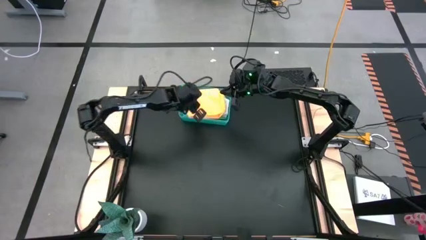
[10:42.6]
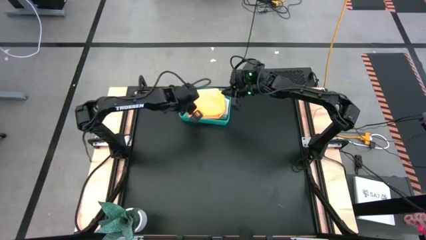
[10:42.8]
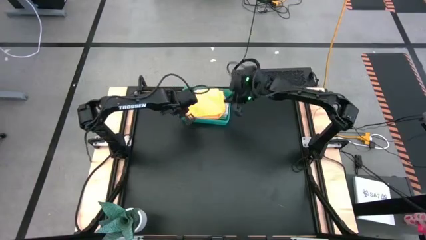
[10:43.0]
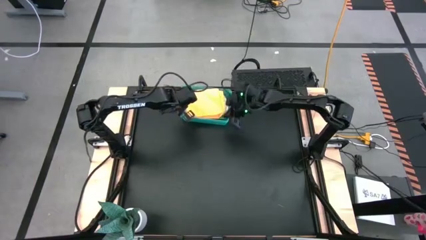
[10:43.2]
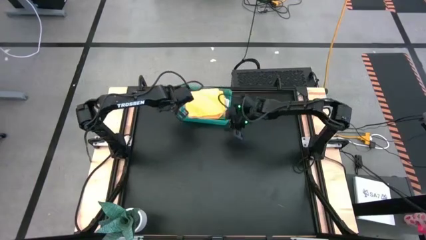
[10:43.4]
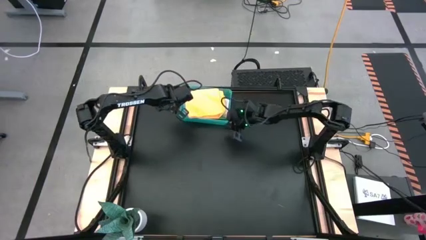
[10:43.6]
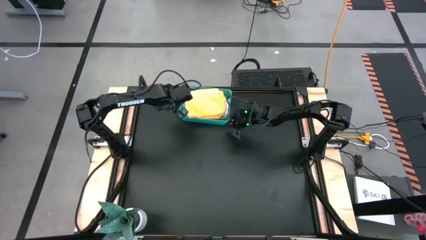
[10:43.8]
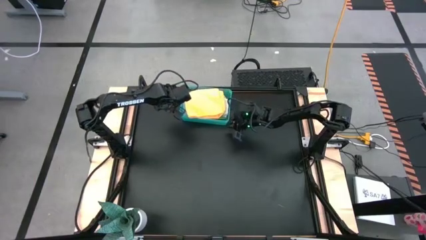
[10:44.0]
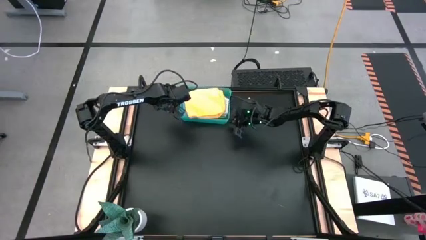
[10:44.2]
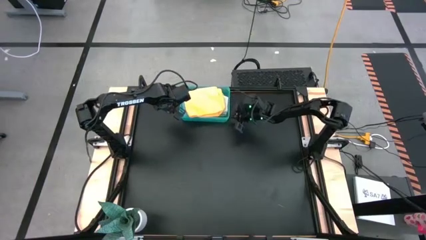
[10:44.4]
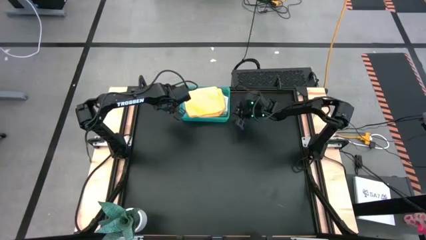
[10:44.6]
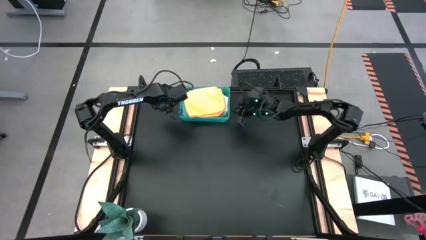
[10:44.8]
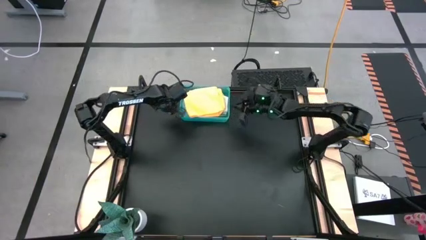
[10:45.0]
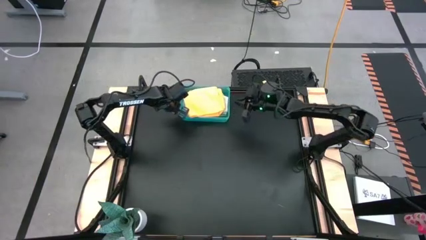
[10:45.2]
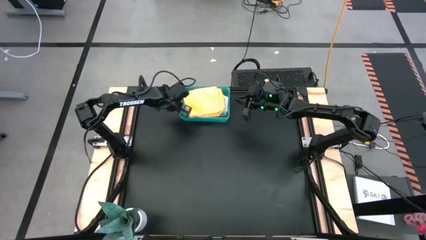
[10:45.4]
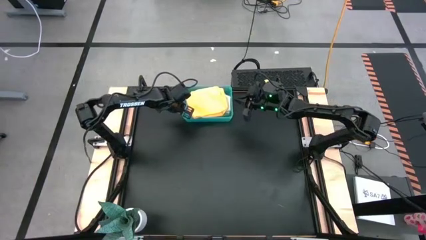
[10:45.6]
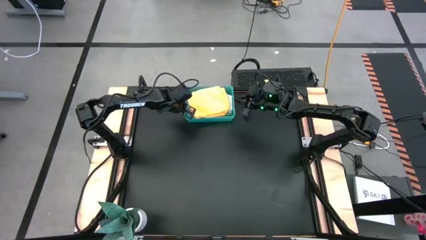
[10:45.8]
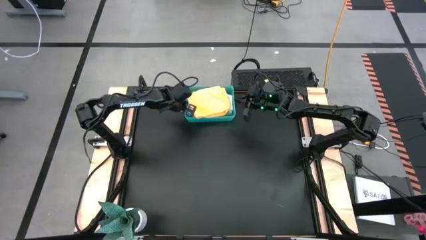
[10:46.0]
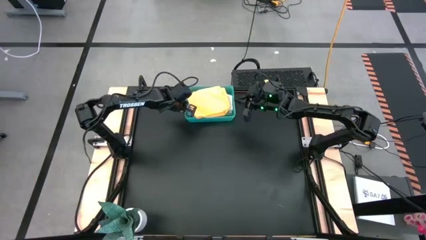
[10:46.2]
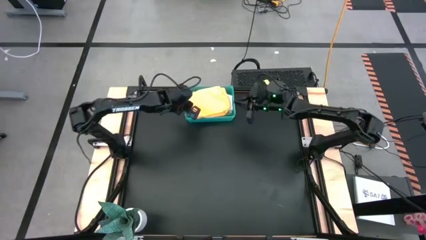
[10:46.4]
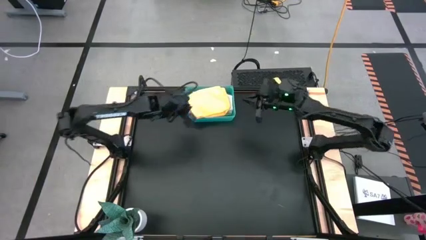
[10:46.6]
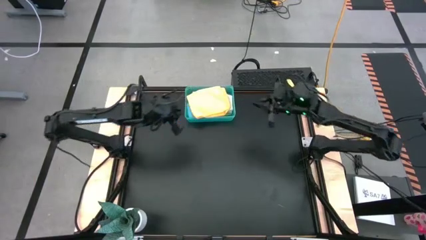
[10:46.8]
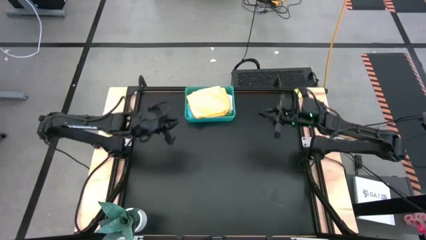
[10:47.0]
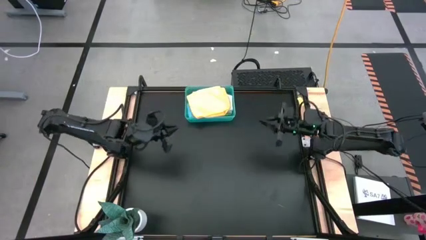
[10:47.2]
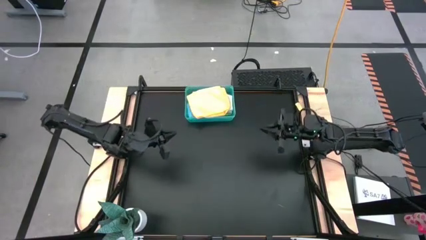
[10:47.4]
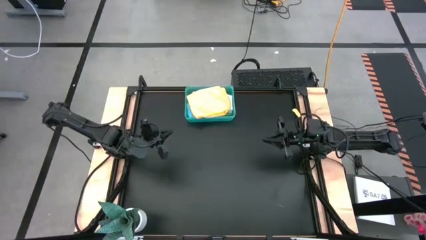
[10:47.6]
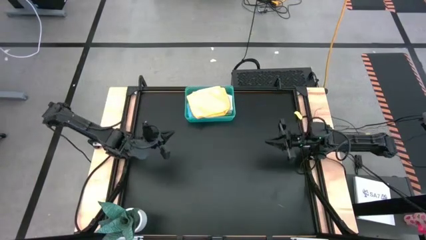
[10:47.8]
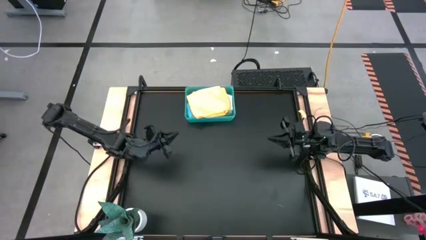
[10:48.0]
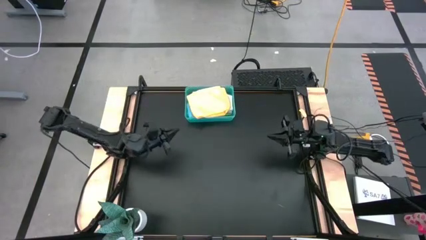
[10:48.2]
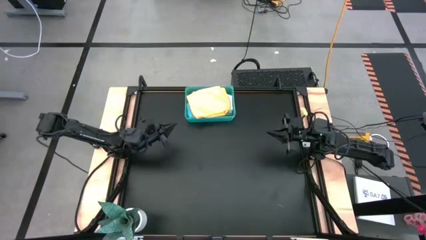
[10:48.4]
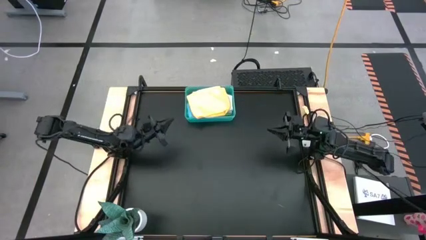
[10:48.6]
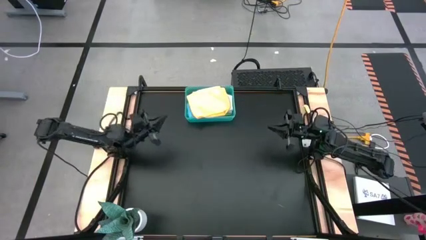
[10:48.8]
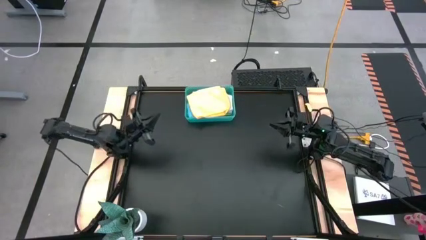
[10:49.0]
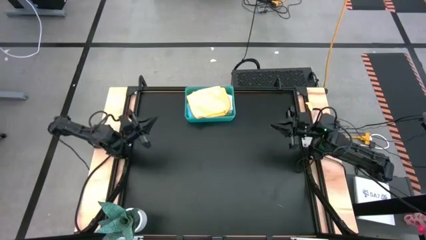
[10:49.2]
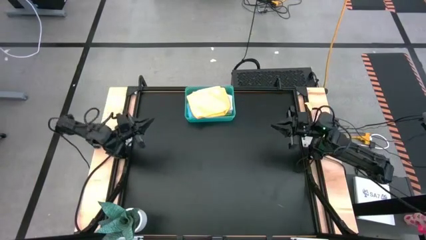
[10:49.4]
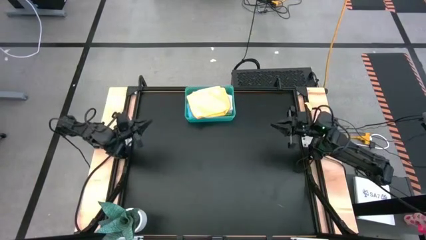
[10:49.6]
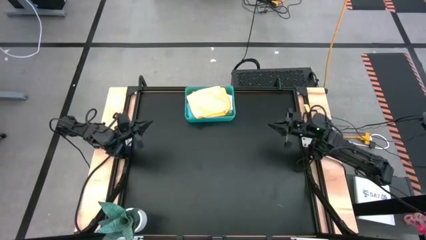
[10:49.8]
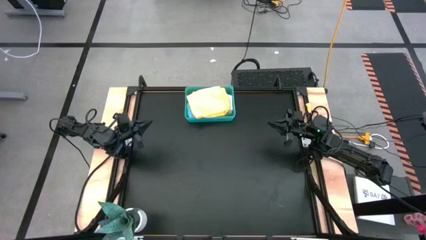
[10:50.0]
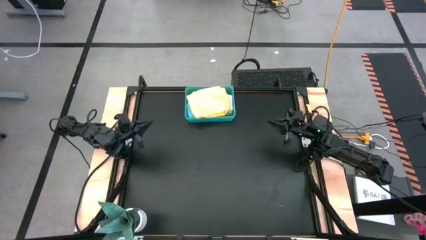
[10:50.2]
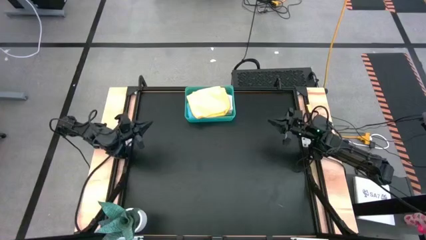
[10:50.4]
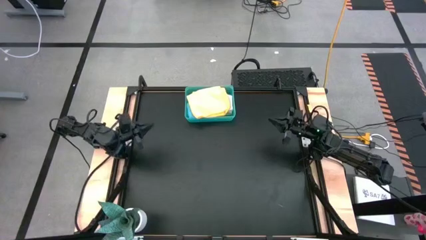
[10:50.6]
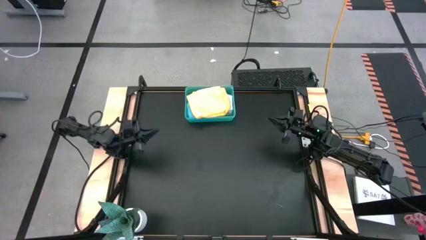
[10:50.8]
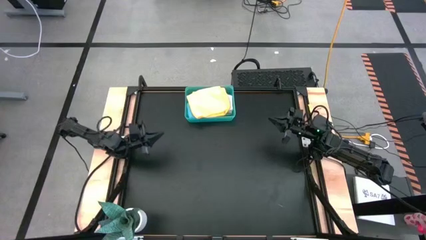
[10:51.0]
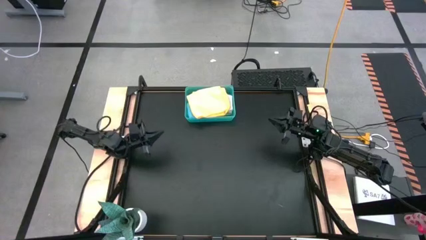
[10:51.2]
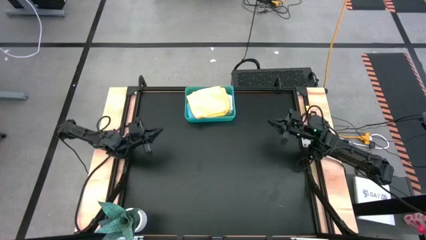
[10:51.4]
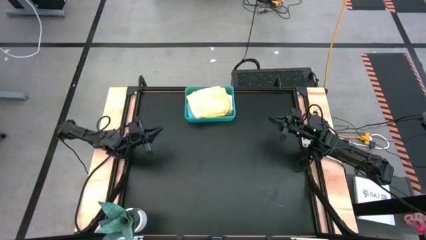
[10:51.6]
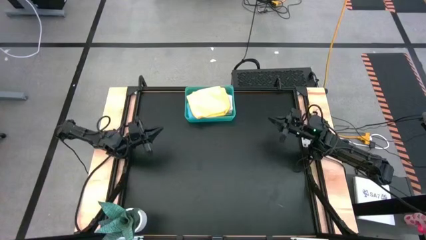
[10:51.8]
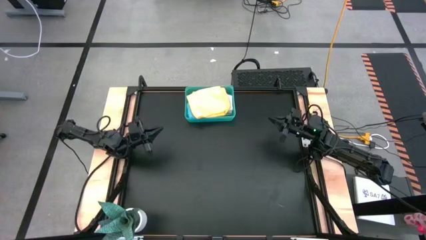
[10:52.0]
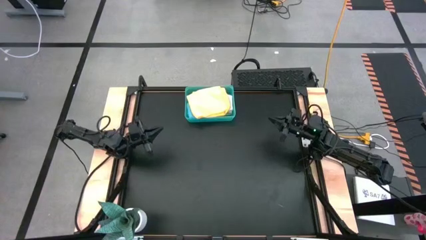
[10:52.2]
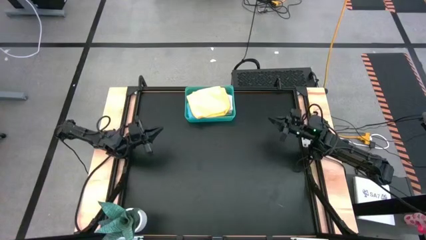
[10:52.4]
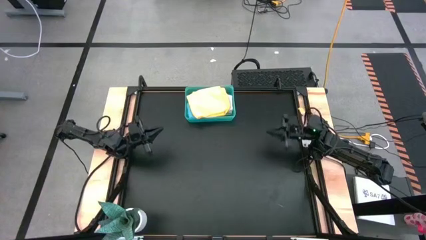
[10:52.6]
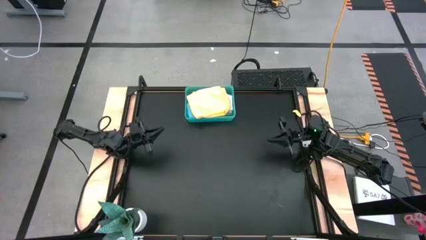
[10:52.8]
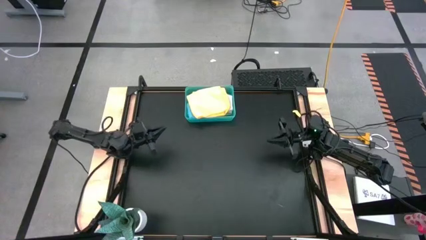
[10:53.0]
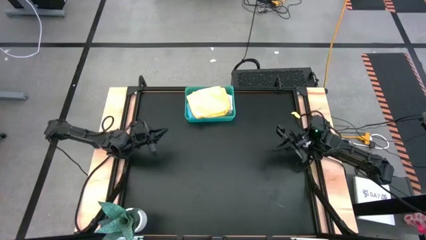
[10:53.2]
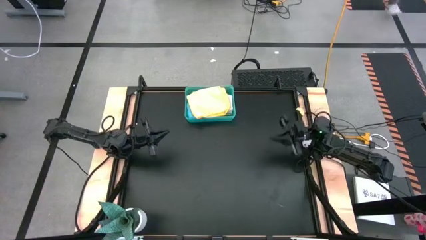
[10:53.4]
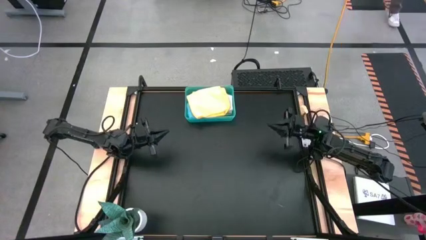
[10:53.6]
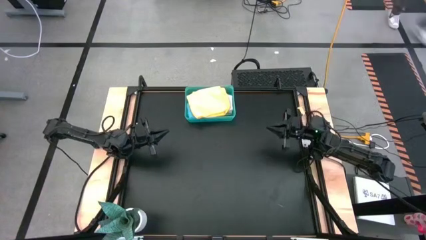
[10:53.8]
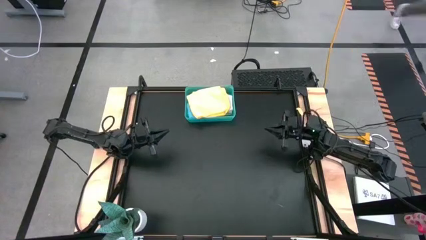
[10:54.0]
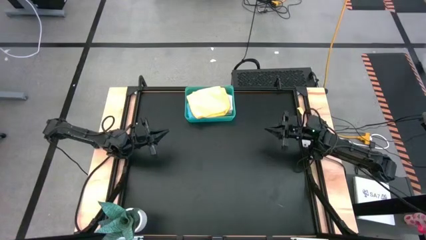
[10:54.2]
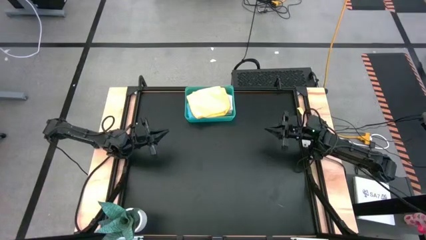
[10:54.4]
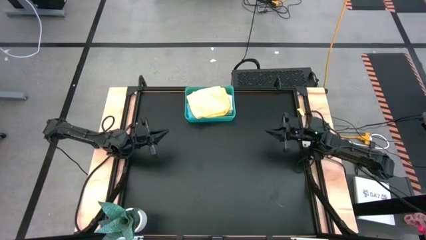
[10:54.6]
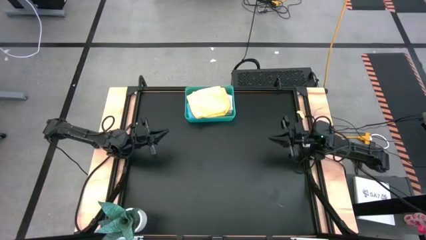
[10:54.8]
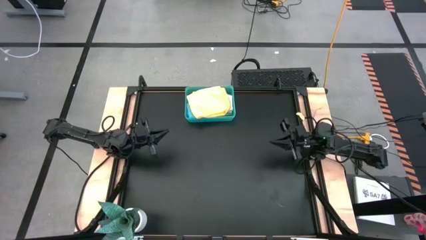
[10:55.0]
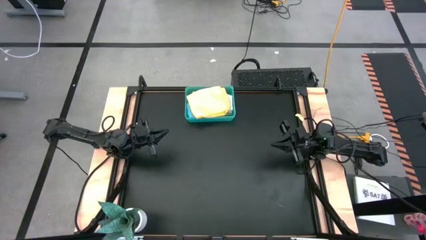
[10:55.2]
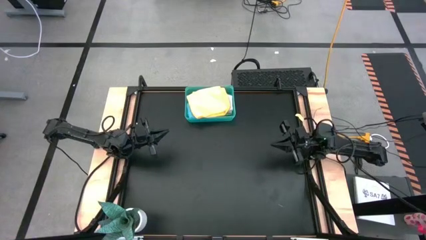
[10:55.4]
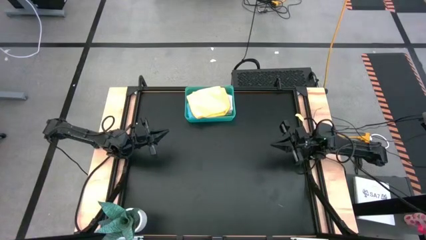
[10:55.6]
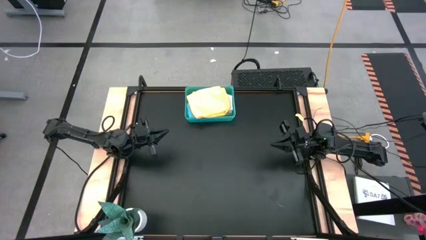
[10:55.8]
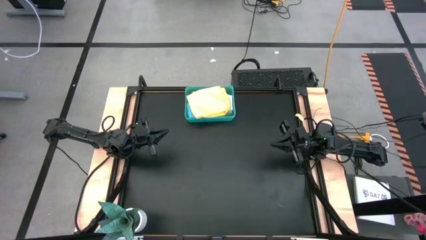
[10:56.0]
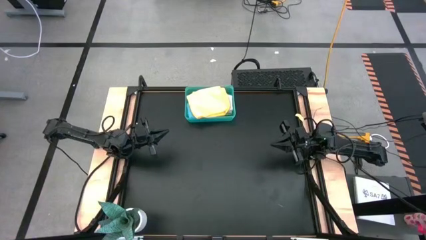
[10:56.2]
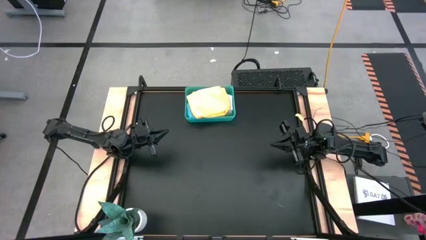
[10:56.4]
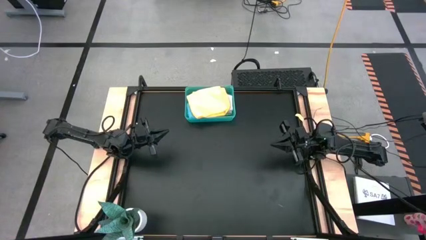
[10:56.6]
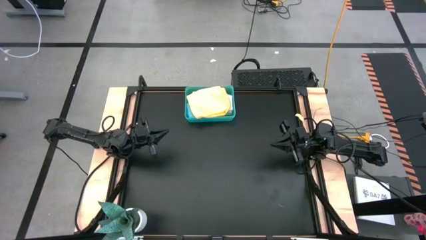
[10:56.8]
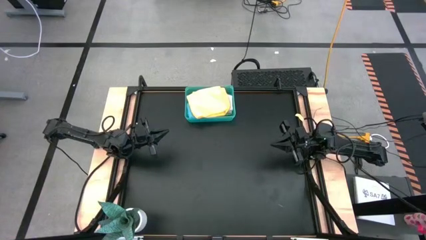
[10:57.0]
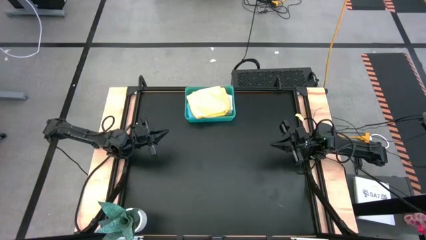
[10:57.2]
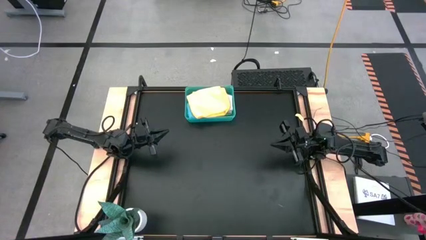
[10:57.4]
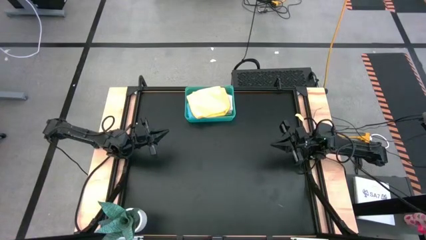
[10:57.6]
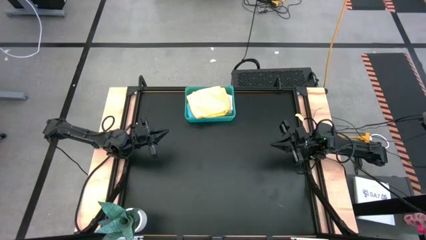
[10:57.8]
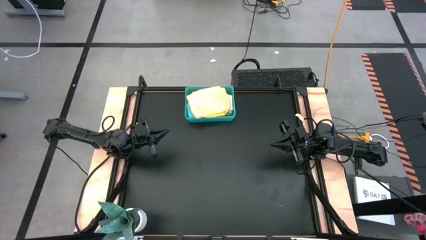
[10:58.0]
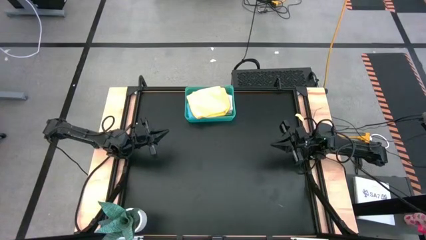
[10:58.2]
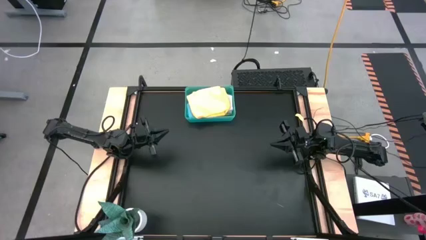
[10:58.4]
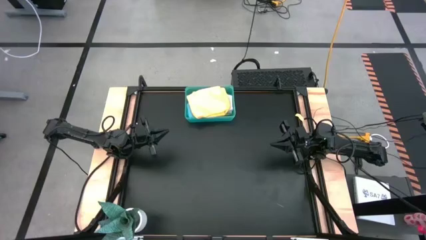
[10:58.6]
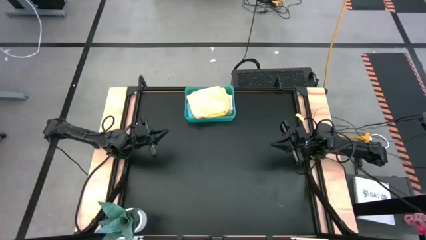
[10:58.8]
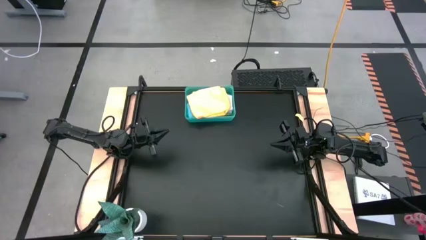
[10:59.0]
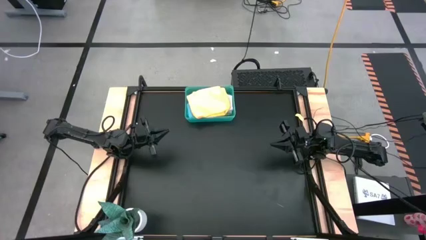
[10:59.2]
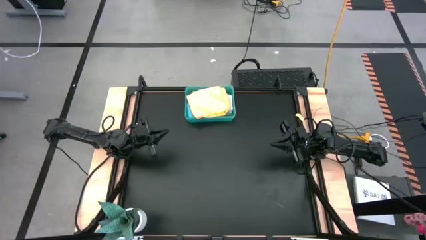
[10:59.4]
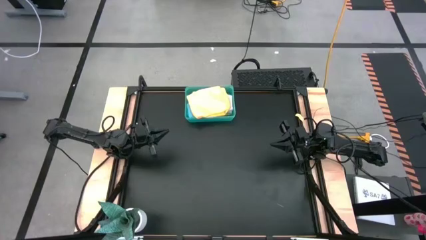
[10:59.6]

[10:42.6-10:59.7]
Task: Fold microfiber towels
Return to Home Position
